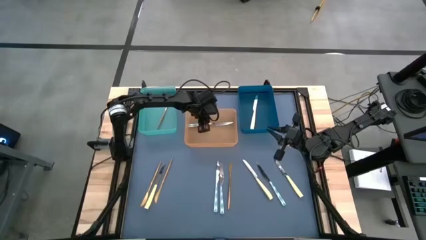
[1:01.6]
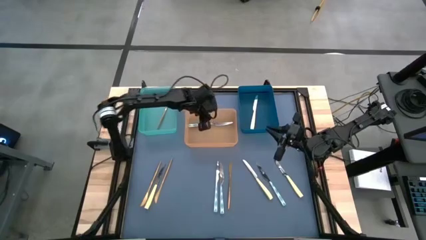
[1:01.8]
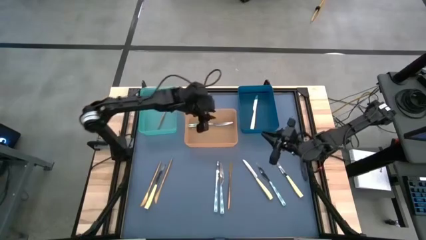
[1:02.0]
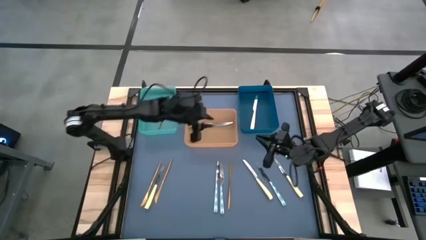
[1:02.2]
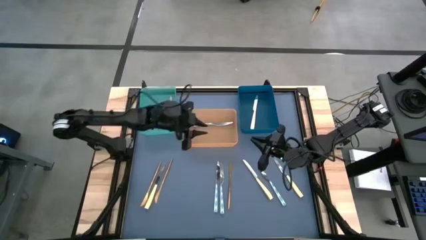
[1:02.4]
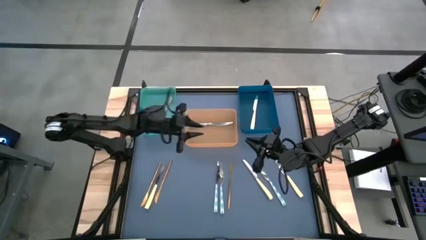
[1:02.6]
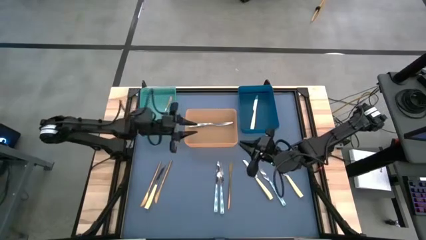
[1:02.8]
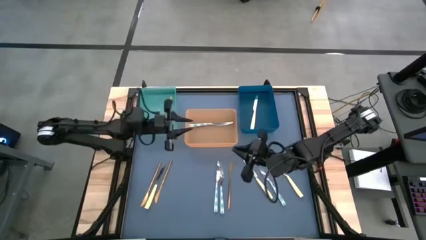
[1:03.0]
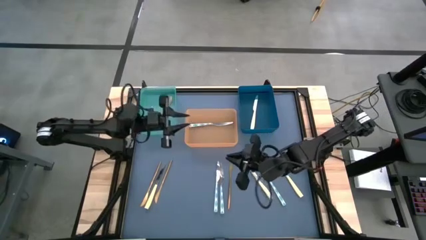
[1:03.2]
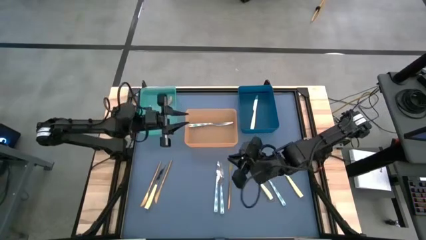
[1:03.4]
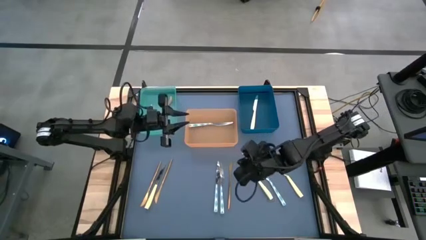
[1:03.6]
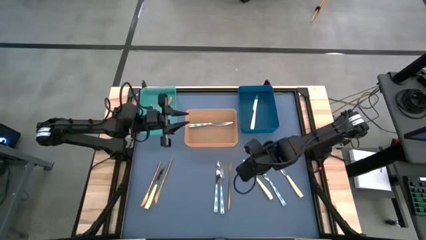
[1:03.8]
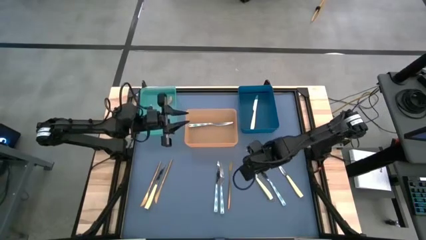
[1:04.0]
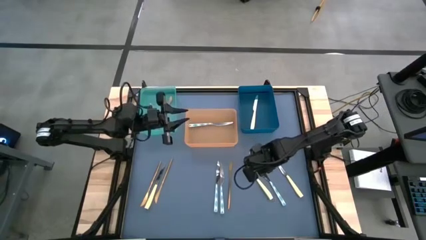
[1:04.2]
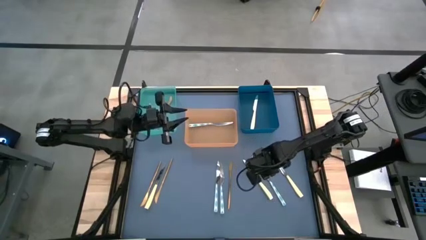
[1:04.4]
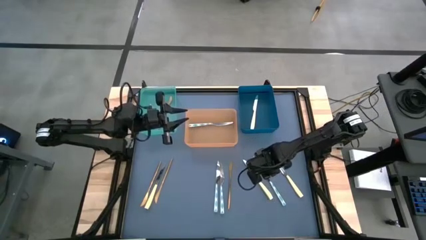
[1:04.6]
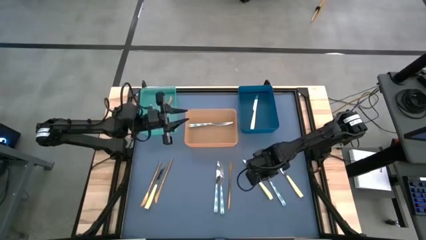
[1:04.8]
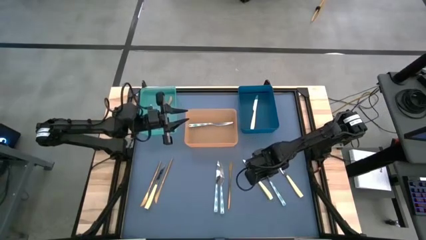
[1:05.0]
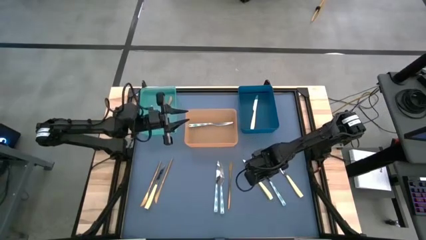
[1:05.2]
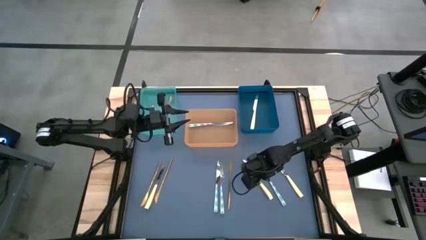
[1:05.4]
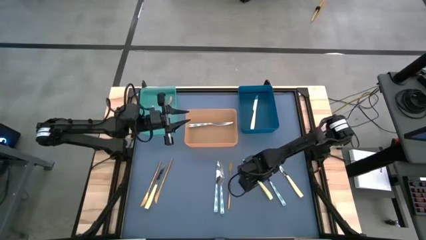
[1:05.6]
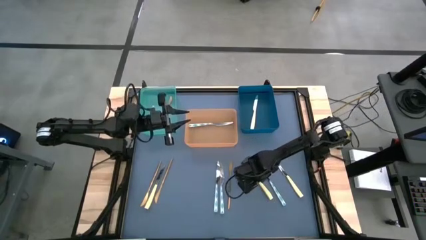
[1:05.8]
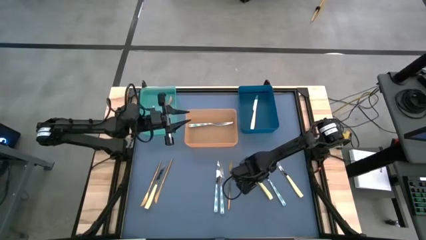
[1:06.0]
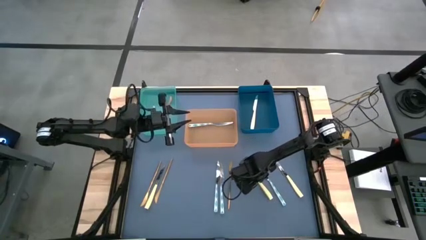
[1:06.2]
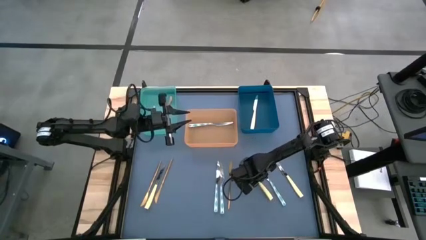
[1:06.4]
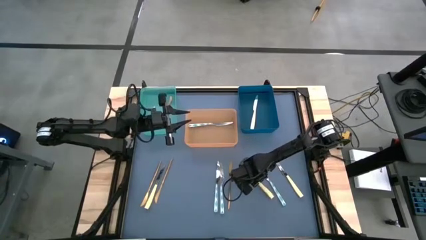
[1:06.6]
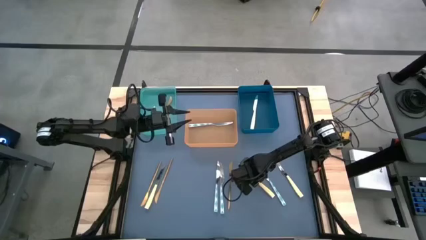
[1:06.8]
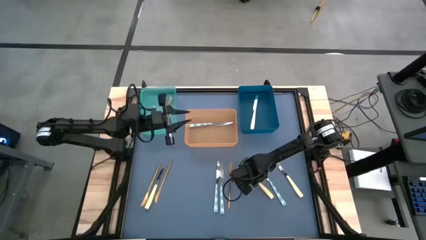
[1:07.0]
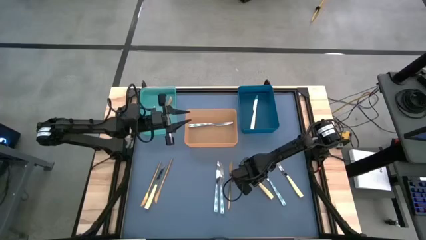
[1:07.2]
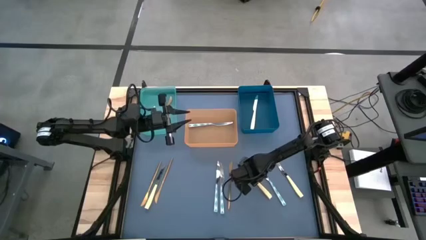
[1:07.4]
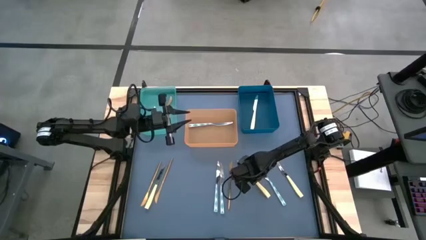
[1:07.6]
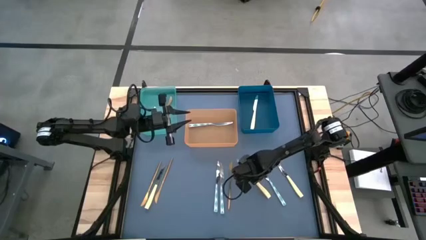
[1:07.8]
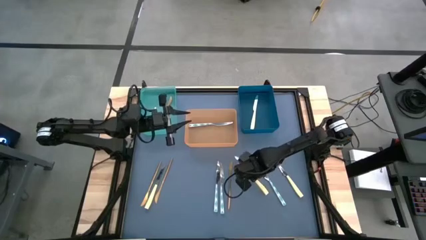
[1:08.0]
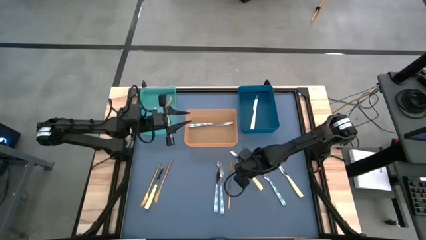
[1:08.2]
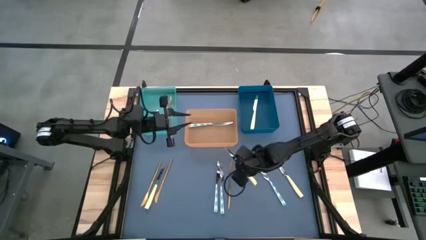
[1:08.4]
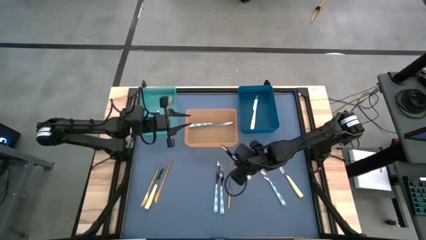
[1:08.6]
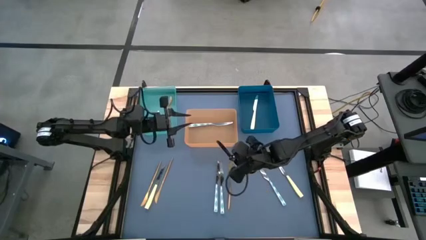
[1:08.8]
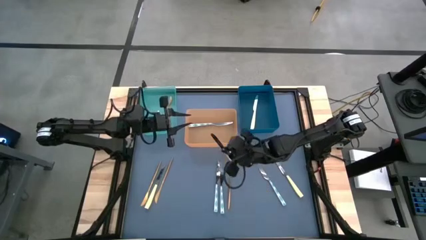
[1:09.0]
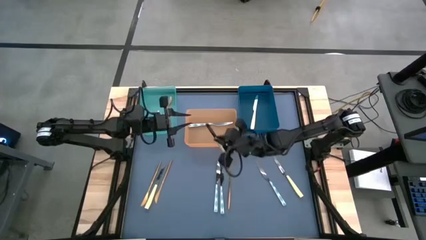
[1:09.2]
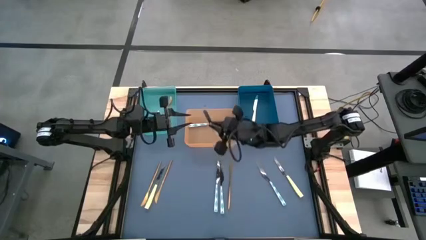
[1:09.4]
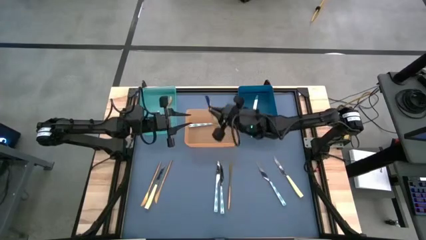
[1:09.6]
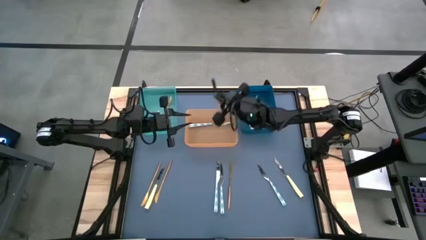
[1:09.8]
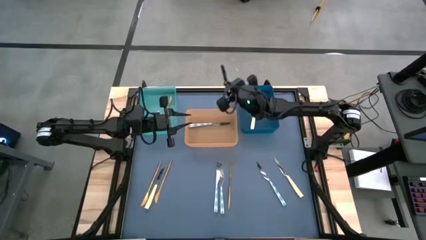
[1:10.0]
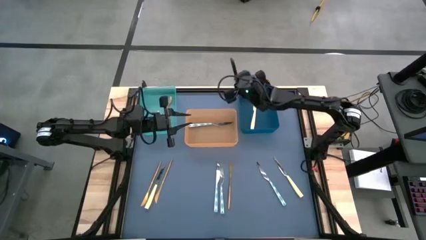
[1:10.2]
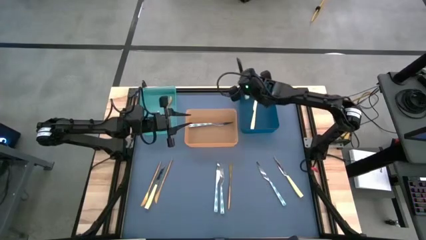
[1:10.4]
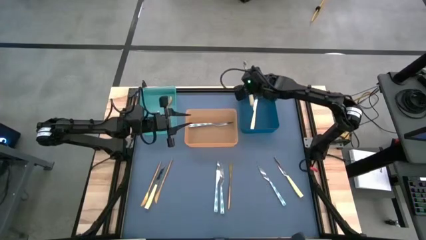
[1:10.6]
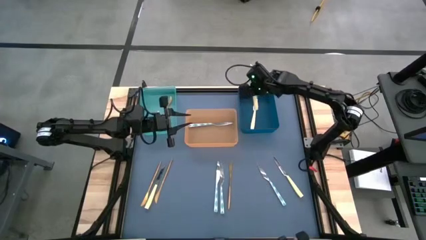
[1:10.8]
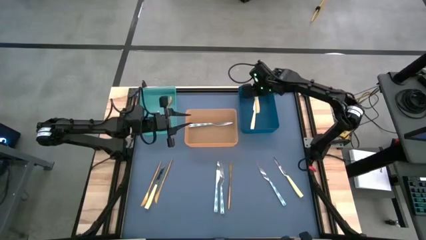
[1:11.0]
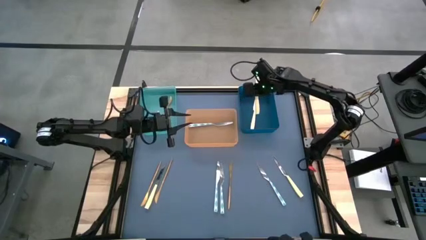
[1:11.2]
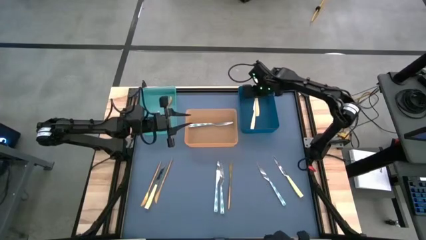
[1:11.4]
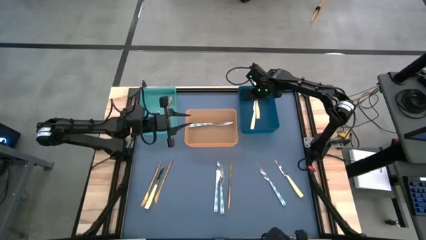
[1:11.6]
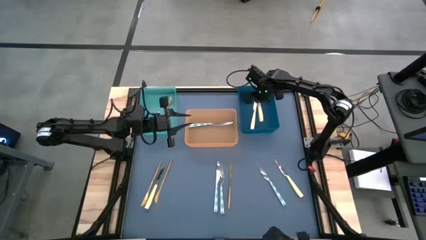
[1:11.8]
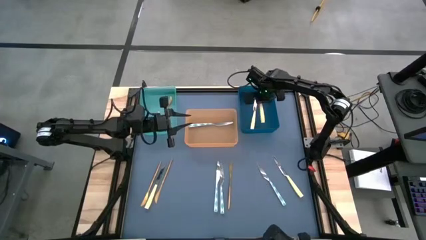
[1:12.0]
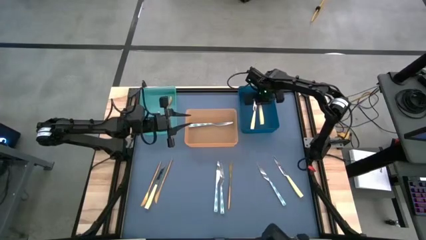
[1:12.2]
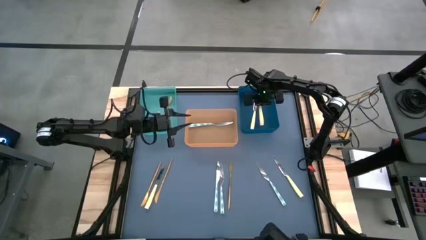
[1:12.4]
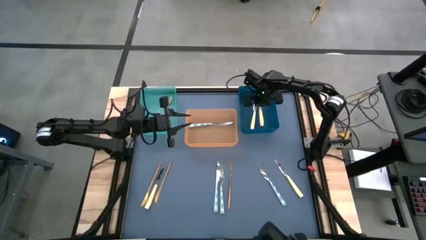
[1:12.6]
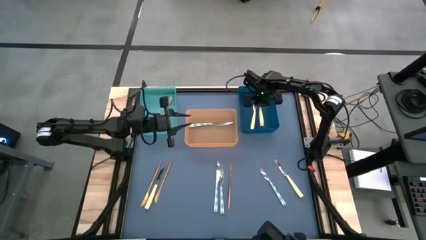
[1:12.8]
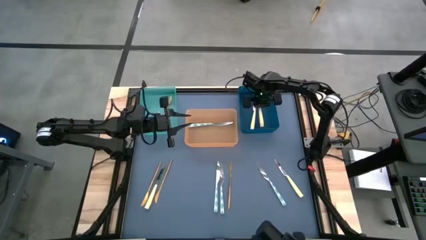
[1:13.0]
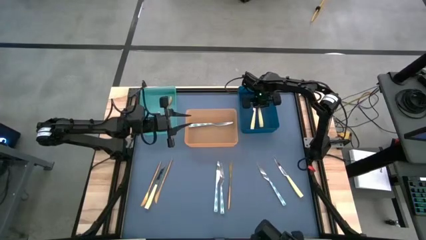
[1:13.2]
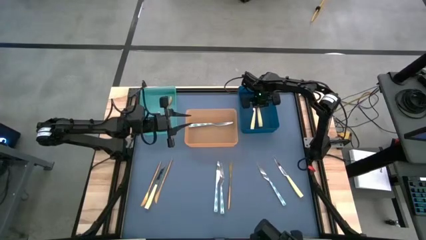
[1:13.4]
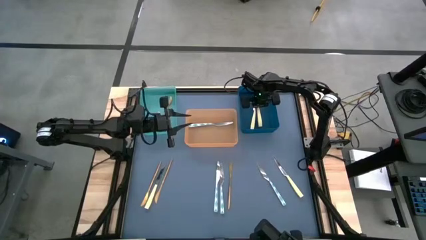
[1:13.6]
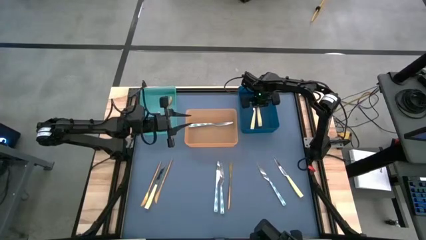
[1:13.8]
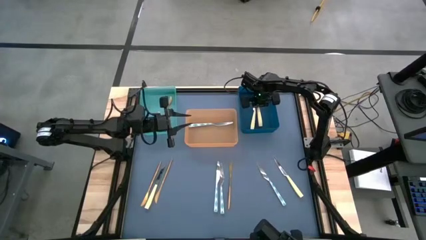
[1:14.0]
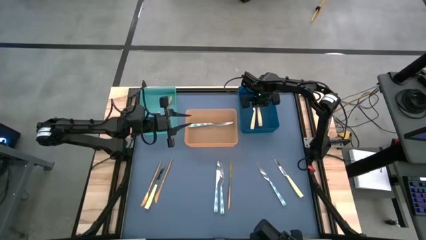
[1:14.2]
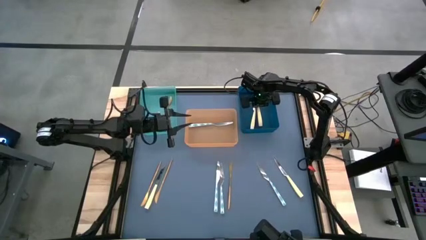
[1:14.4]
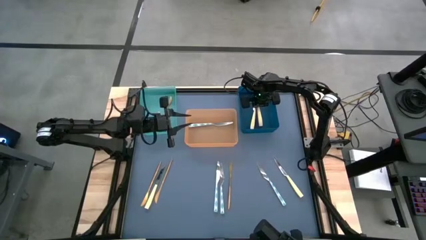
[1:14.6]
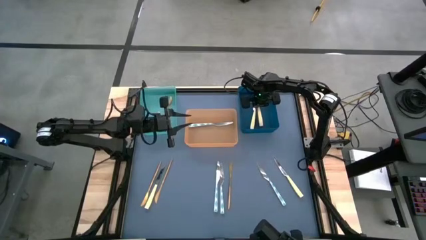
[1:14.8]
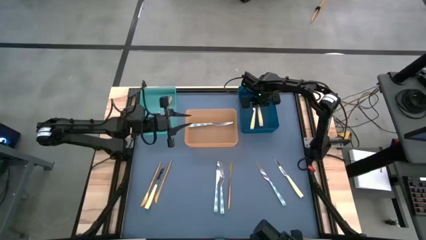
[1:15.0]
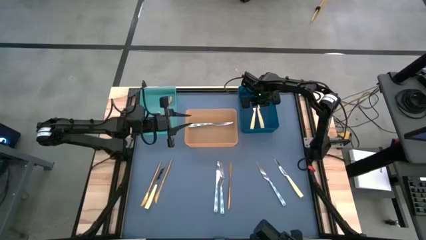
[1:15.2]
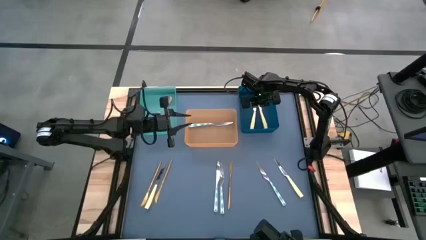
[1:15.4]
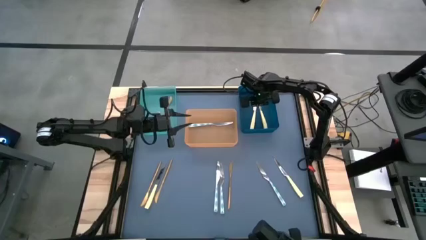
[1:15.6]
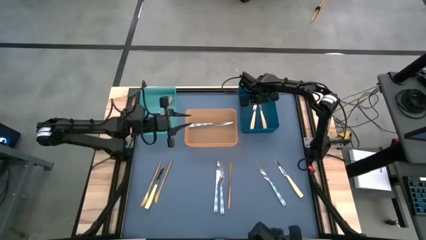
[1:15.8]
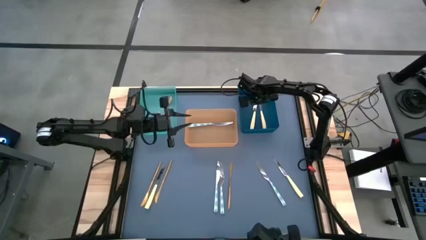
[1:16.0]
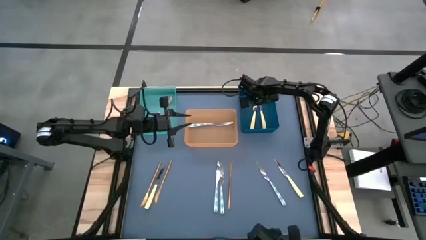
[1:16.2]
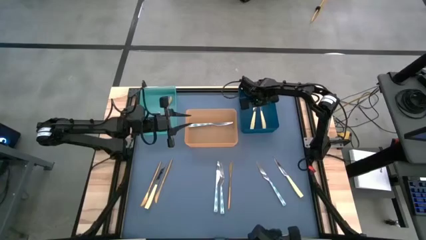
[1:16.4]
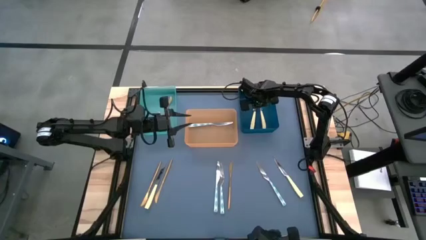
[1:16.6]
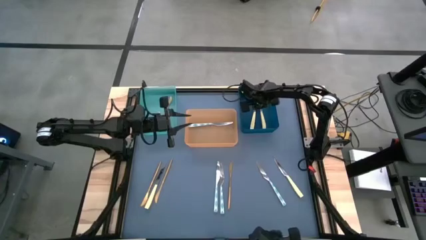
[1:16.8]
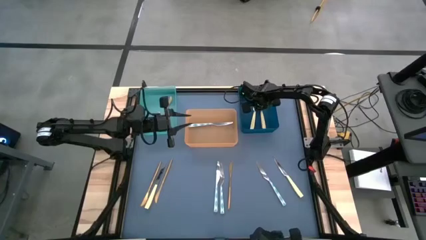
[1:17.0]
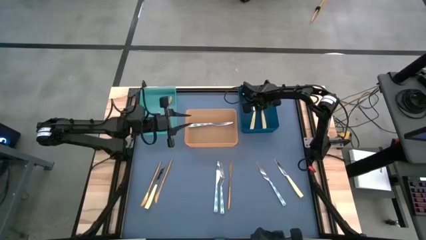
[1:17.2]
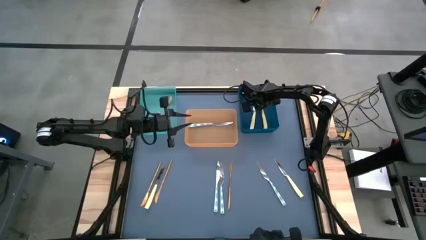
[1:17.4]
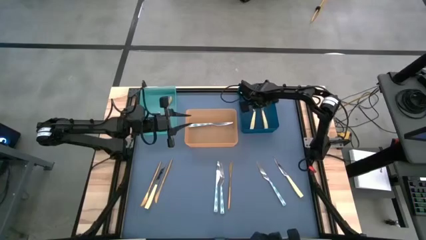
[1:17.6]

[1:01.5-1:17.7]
Task: Sort silverware by color (type)
Put the yellow knife into the blue bin

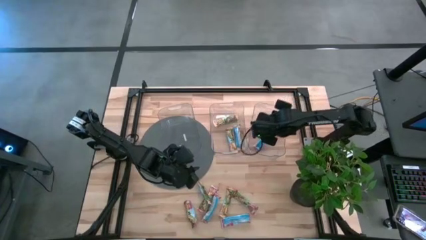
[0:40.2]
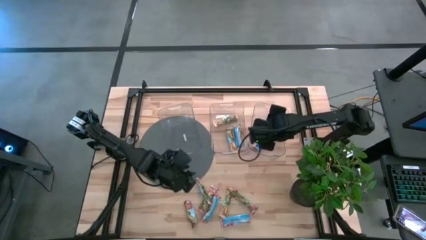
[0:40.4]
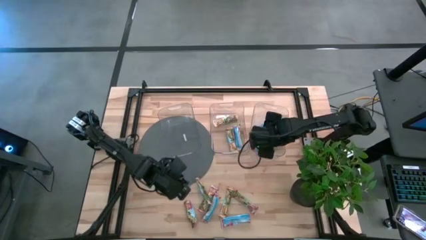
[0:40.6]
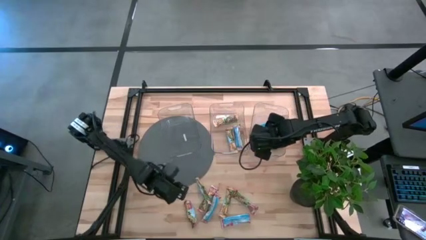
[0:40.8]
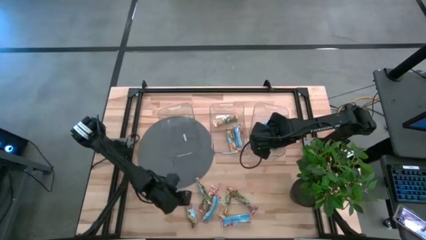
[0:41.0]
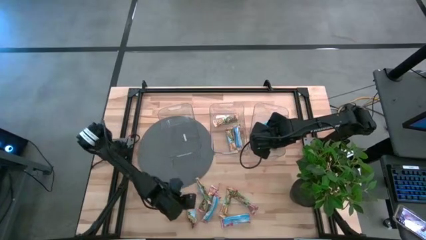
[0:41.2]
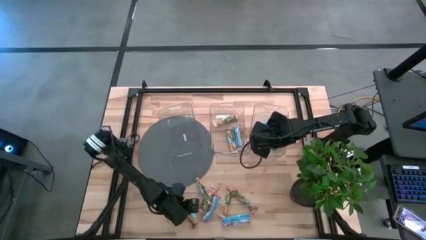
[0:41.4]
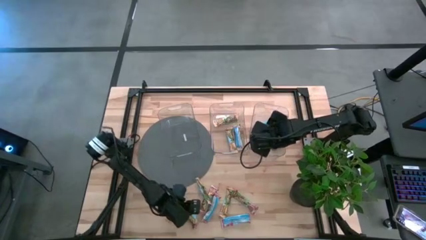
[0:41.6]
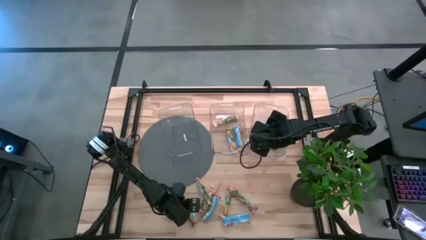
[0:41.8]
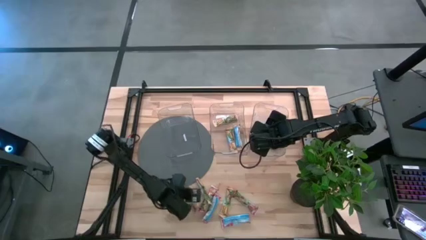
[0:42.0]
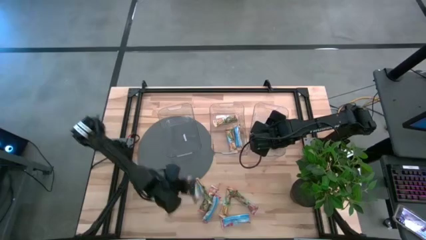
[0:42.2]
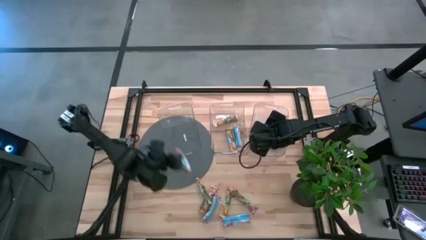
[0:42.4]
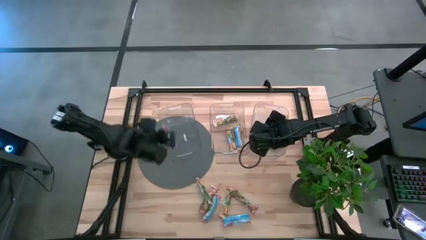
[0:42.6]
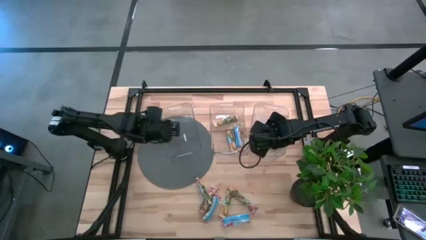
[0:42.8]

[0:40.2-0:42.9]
Task: Pick and place Granola Bars by type
Put the red granola bar into the left transparent bin
